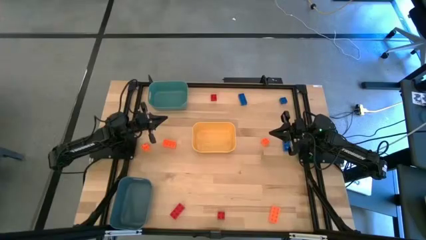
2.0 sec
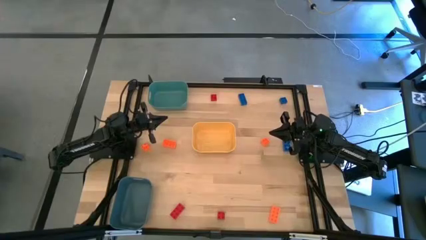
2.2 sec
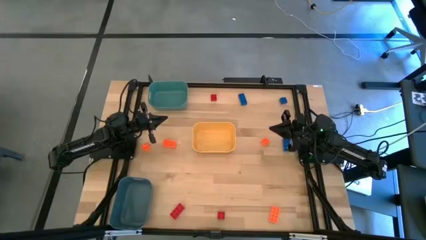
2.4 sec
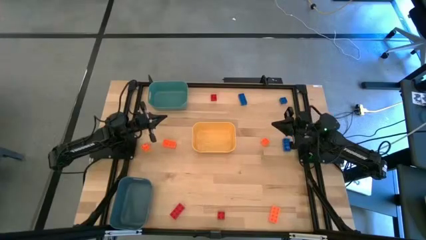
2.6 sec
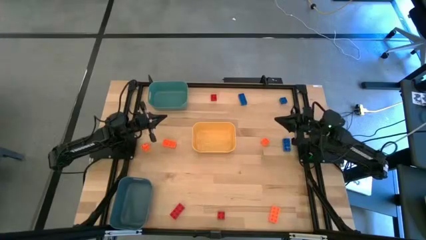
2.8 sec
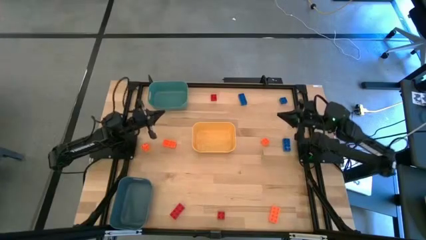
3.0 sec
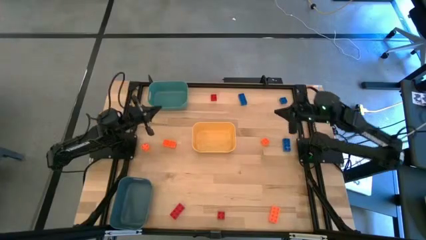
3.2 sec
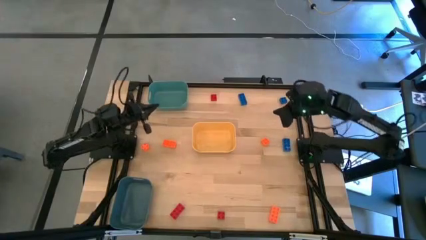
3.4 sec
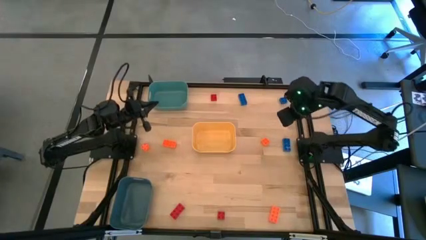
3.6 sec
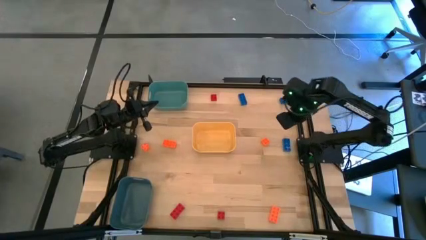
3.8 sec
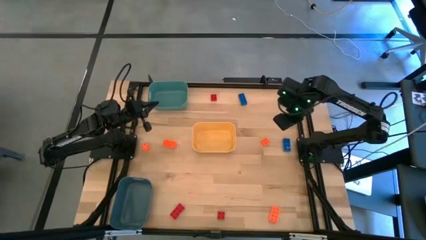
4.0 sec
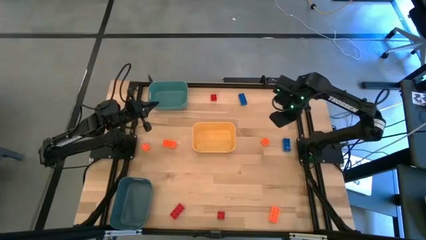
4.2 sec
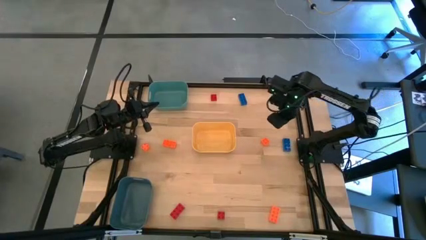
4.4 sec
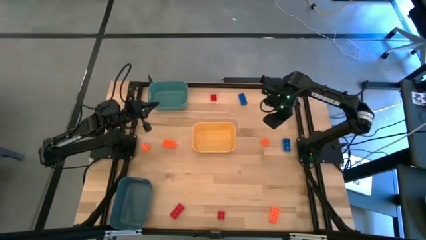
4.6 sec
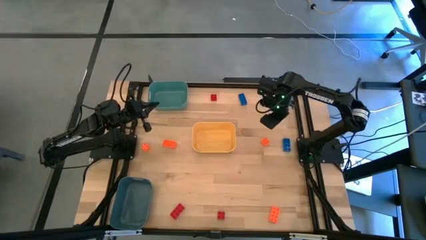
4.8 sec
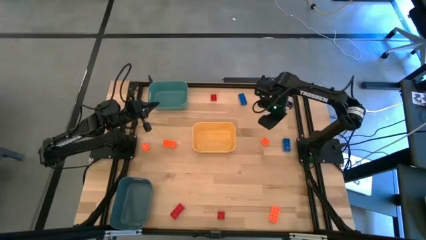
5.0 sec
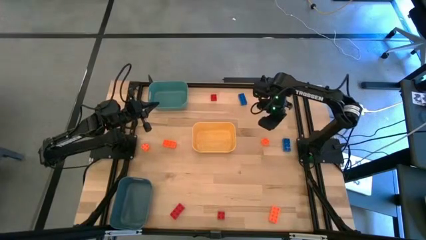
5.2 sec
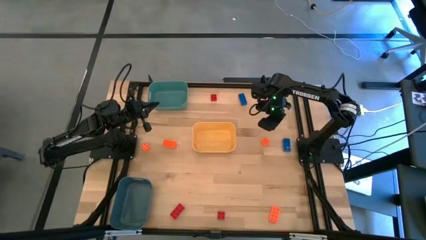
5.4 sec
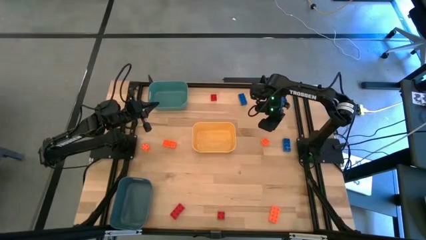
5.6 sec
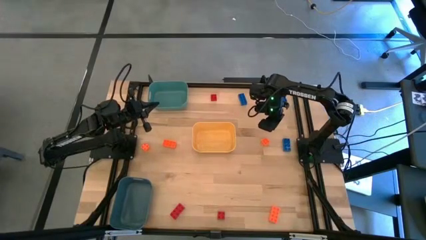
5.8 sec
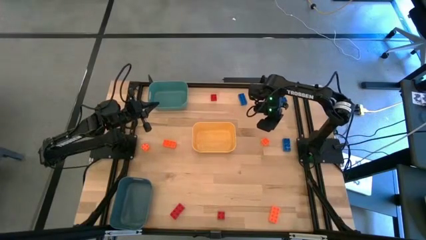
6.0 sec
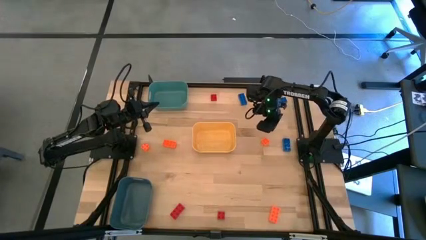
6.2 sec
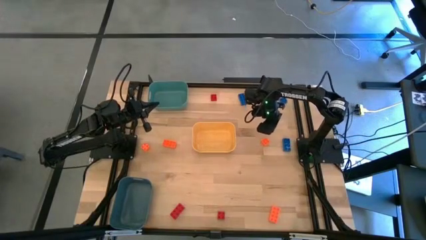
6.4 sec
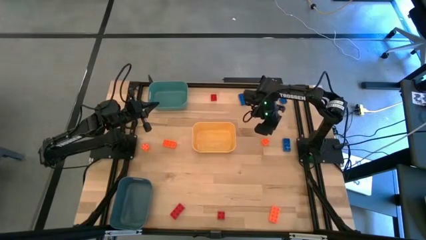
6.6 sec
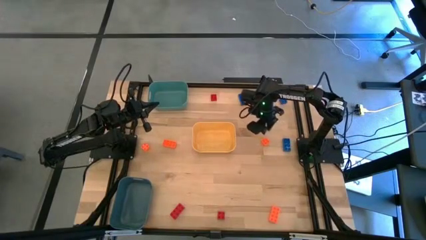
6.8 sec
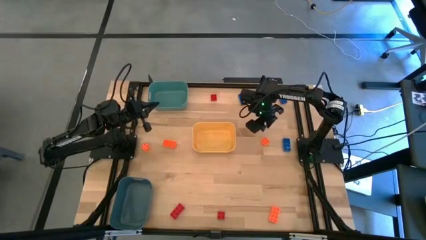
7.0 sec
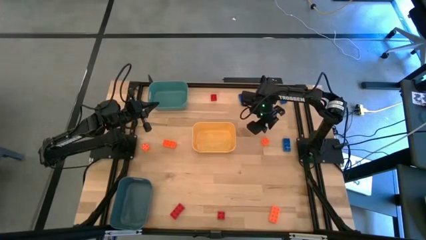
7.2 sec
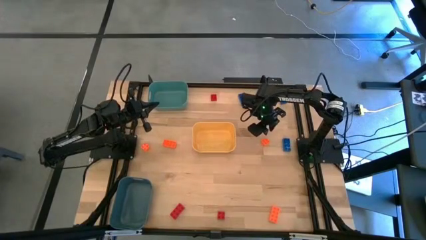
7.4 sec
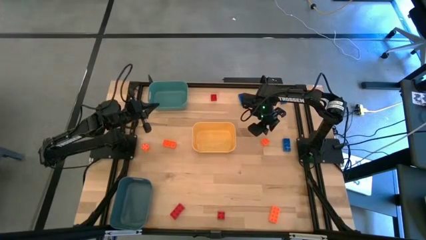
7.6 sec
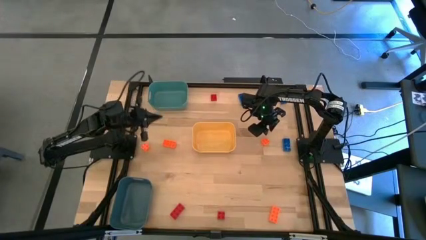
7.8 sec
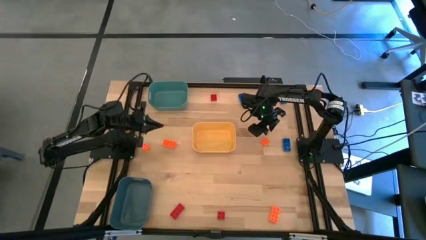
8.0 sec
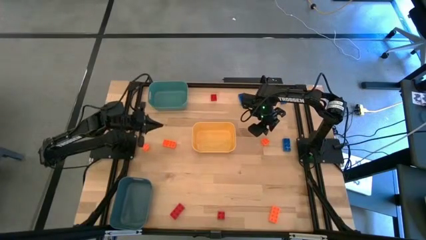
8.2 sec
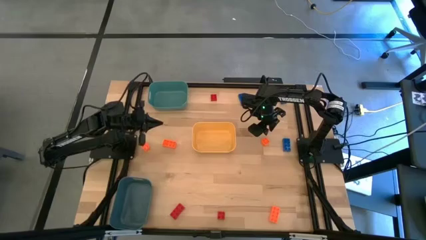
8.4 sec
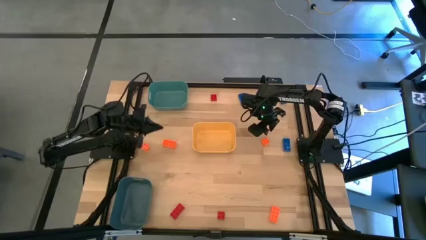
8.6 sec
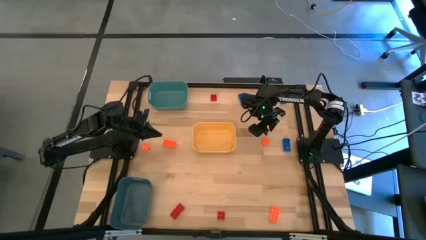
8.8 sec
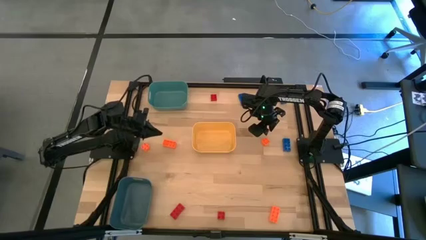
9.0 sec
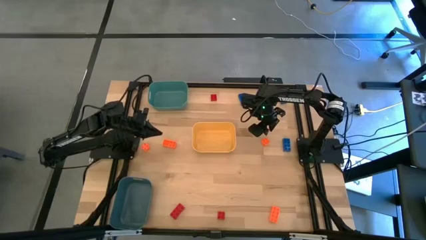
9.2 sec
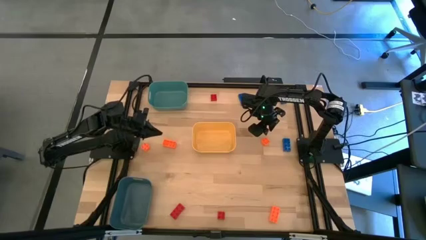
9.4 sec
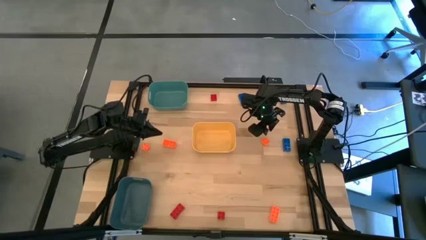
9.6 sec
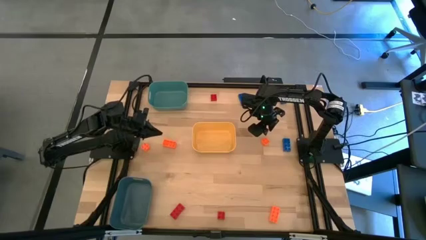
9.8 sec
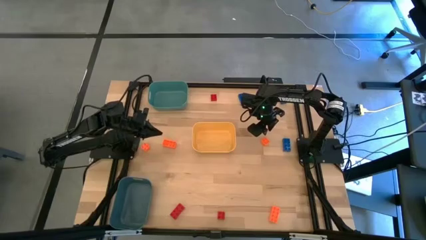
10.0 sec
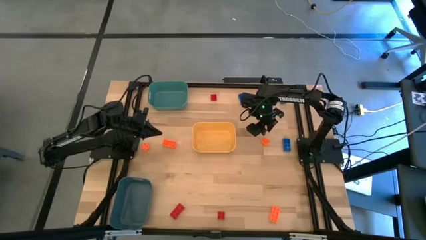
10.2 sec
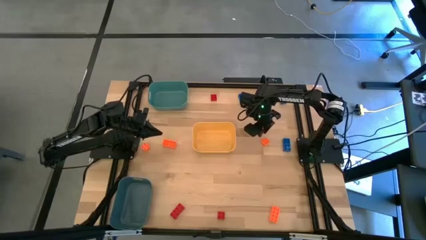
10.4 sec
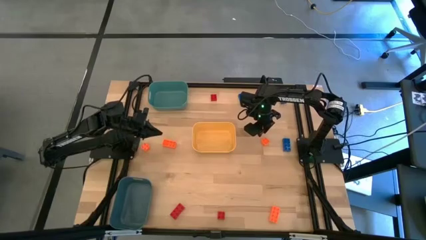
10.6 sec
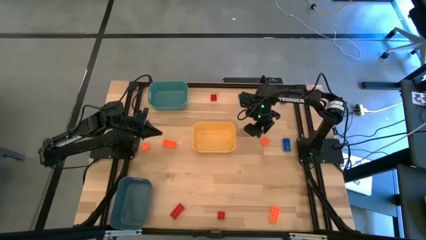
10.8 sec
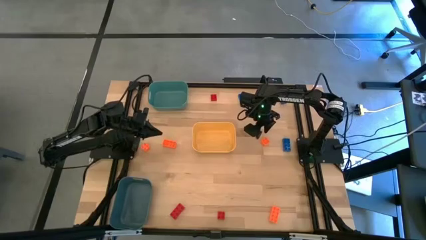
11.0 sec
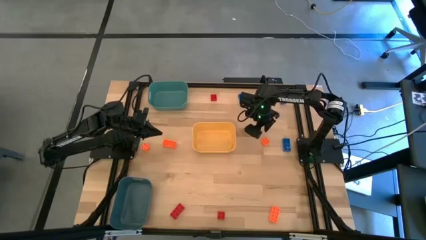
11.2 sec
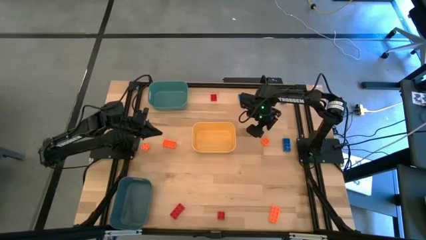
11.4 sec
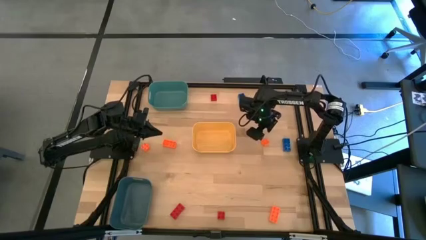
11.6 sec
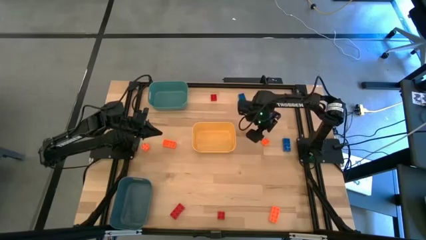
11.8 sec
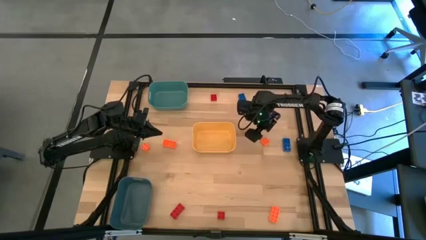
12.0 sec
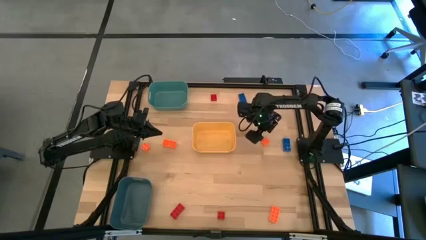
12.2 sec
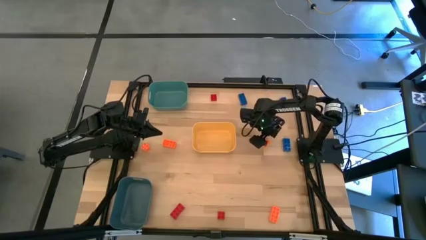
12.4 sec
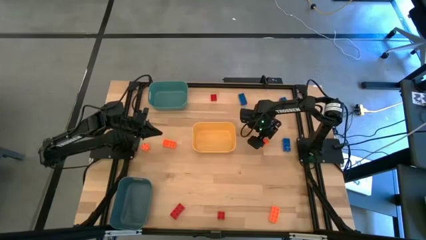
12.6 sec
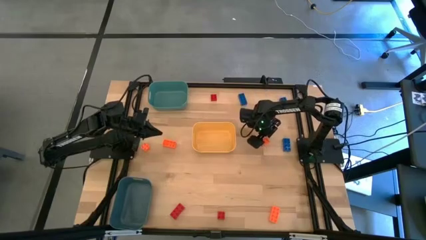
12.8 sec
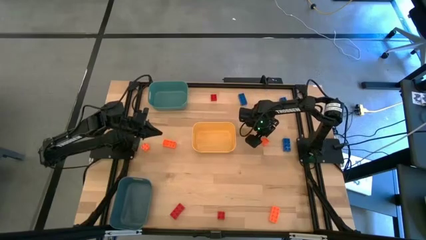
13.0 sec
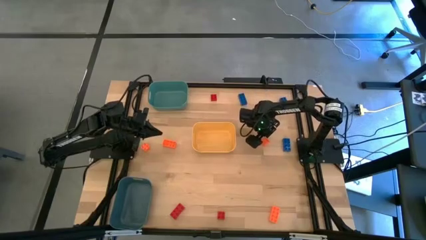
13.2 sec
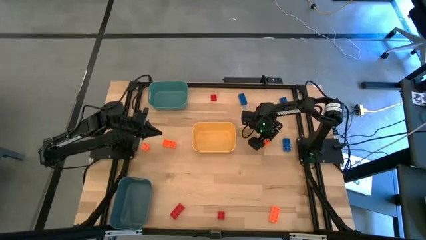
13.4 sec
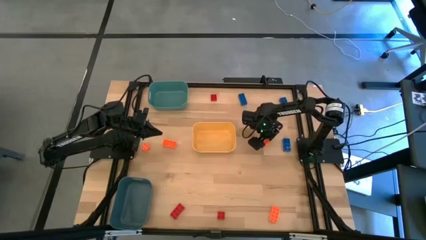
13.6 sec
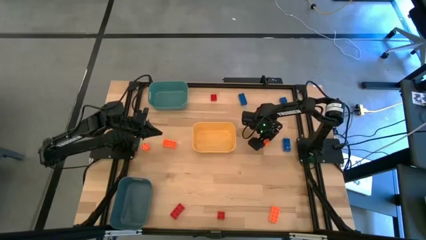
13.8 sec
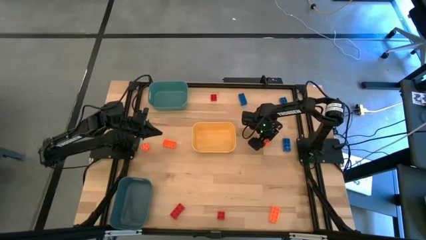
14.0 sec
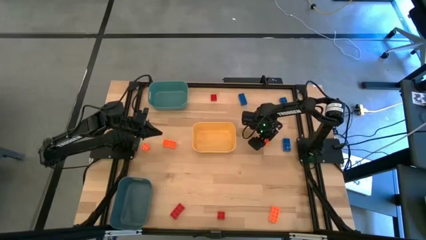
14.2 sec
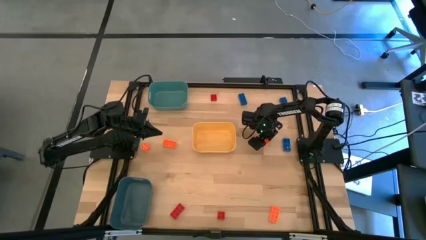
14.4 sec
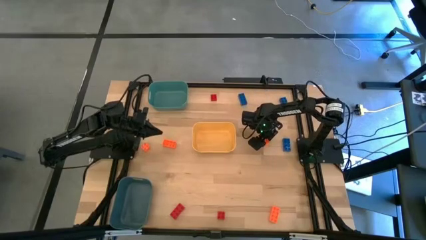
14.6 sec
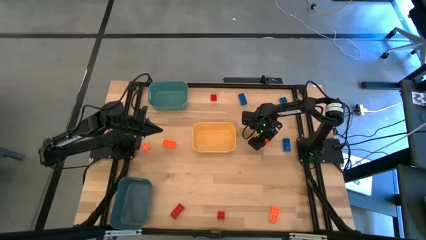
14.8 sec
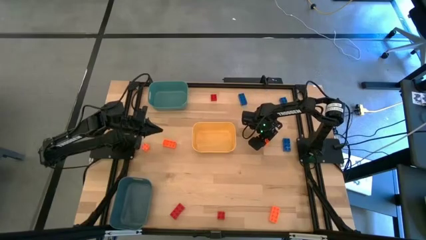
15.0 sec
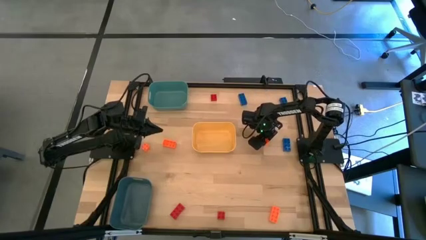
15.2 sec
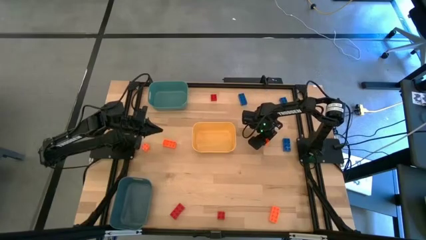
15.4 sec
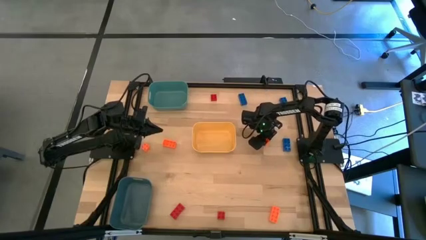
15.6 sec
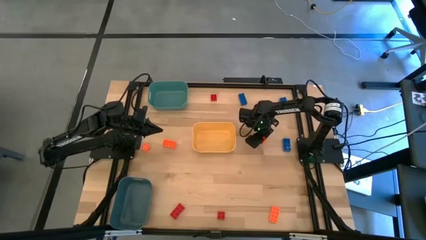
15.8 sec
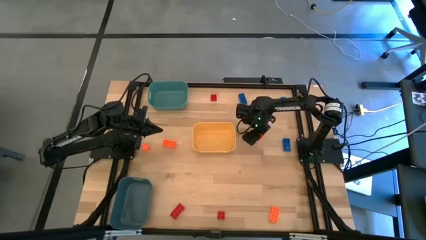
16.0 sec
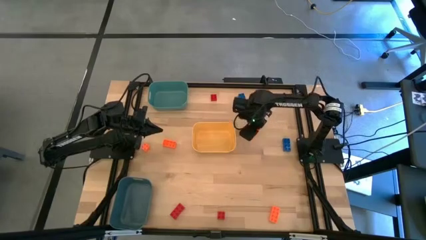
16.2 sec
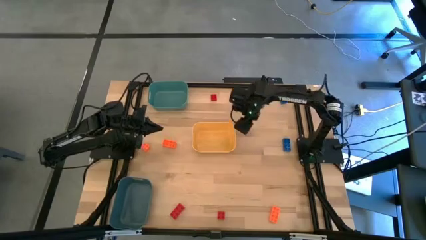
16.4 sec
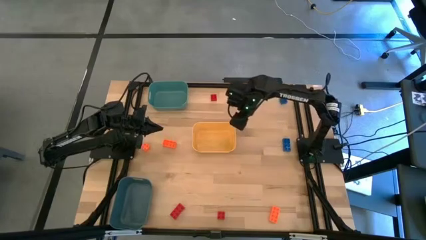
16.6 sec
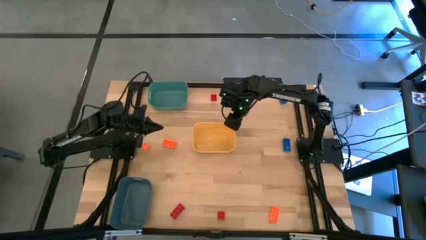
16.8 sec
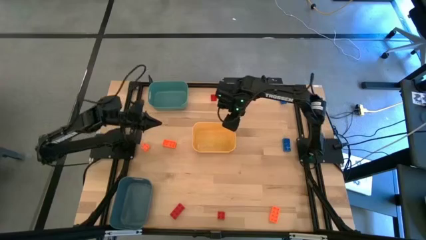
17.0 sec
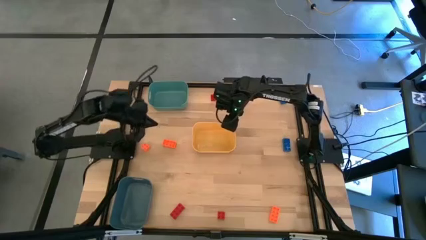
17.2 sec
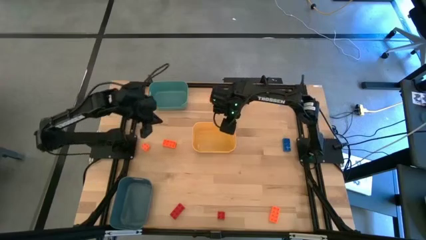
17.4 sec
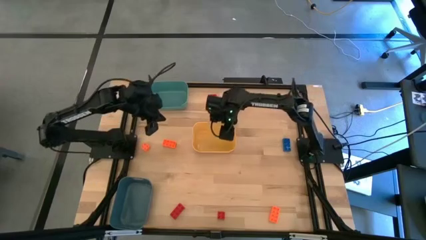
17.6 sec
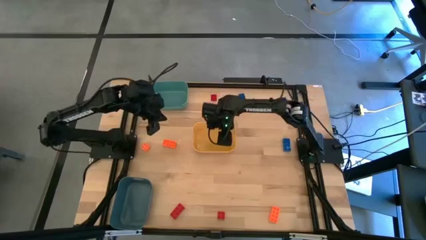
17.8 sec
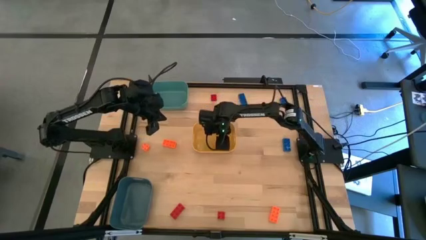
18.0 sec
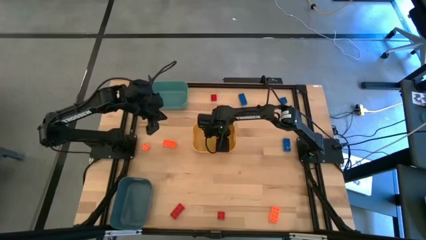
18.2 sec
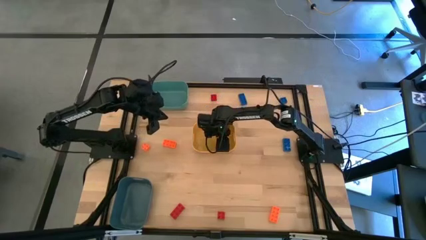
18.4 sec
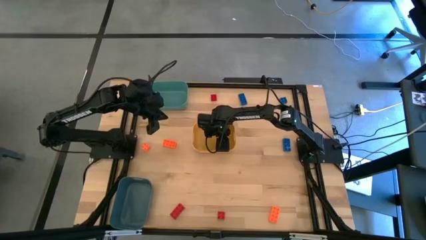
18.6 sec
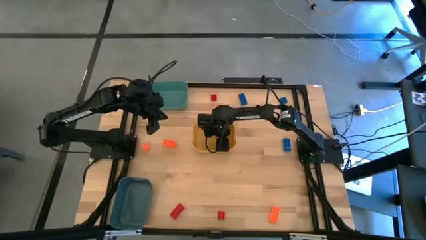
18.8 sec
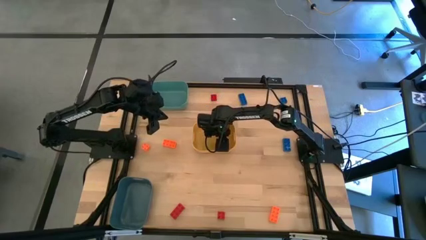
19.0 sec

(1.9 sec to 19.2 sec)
Task: Sort & place blocks by color
Put the orange 4 stud game piece into the yellow bin
